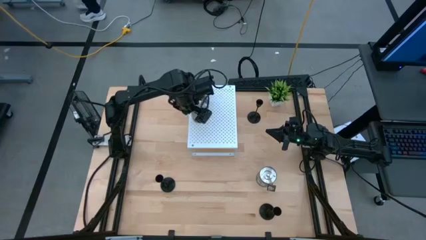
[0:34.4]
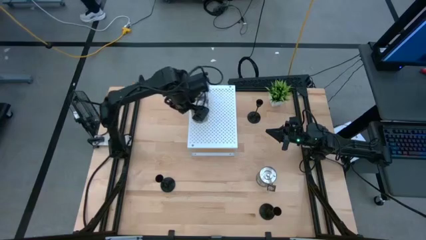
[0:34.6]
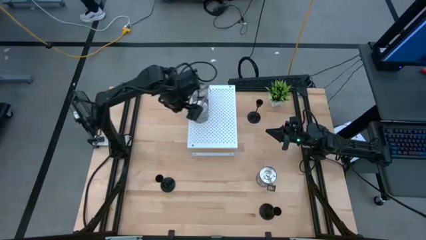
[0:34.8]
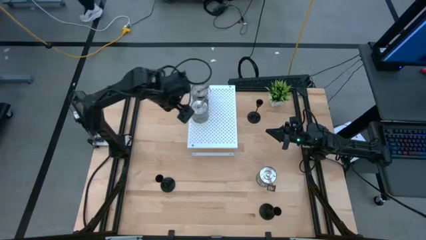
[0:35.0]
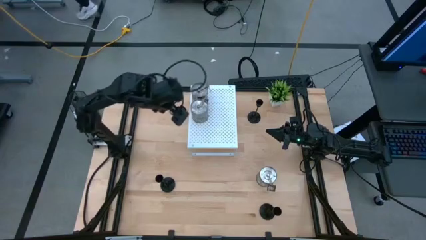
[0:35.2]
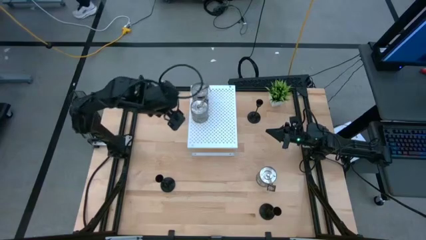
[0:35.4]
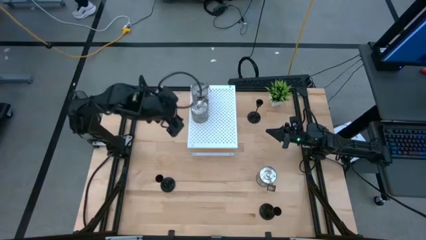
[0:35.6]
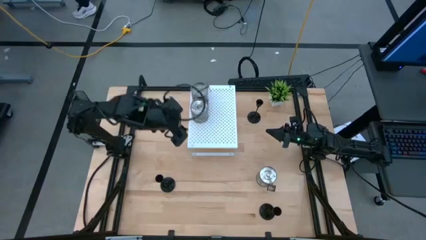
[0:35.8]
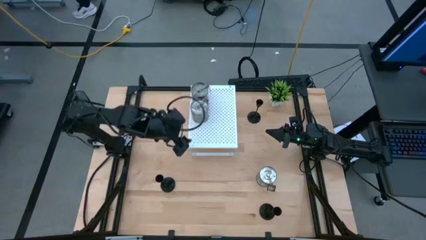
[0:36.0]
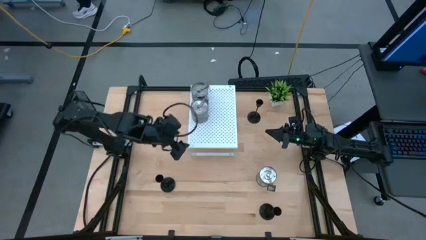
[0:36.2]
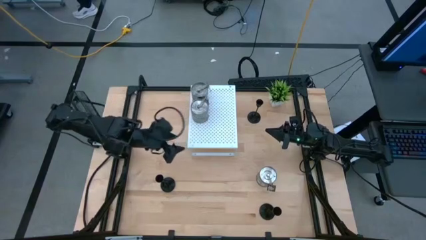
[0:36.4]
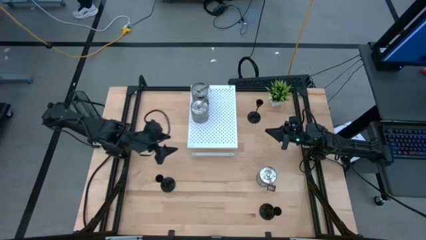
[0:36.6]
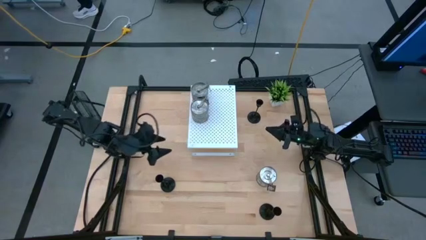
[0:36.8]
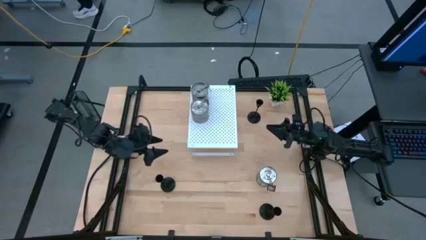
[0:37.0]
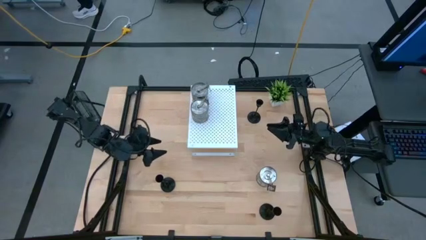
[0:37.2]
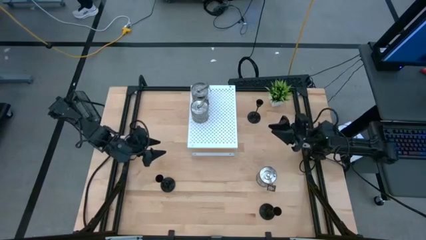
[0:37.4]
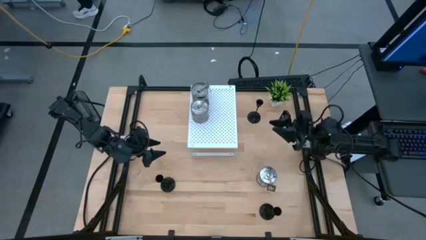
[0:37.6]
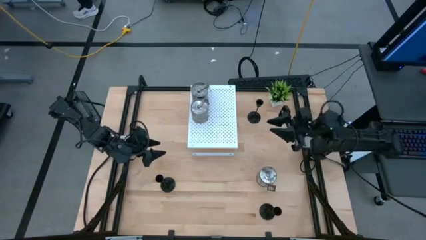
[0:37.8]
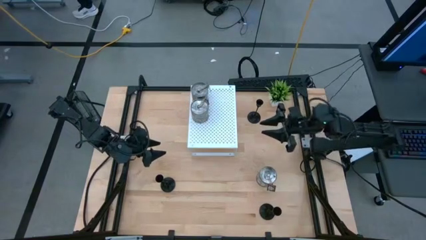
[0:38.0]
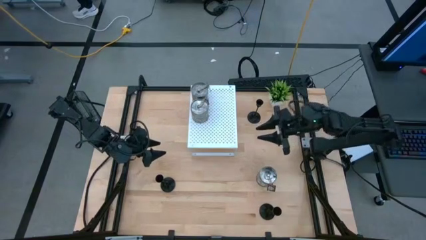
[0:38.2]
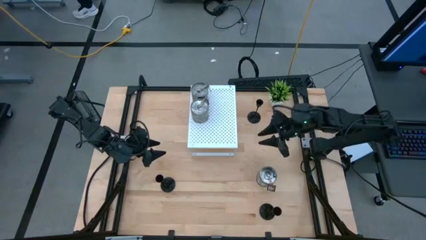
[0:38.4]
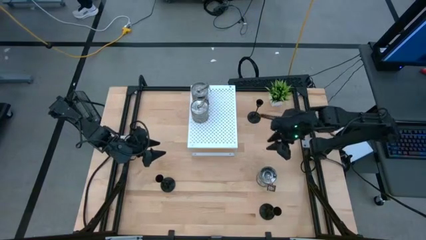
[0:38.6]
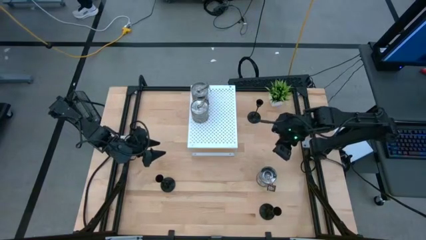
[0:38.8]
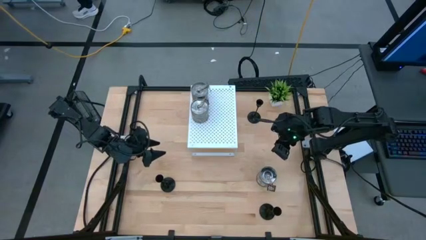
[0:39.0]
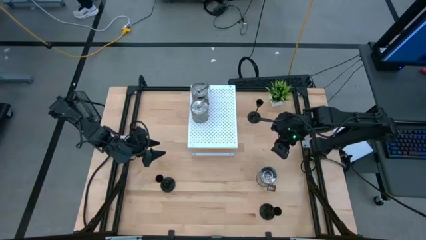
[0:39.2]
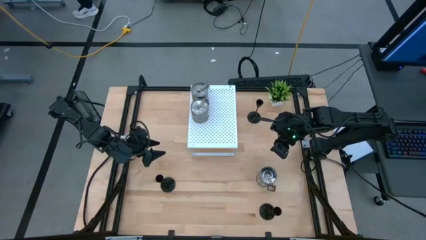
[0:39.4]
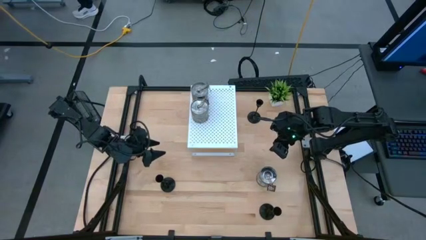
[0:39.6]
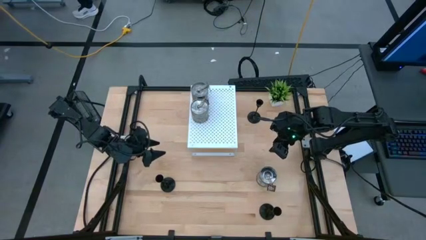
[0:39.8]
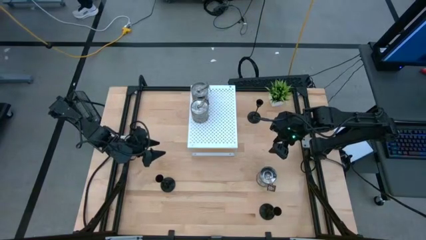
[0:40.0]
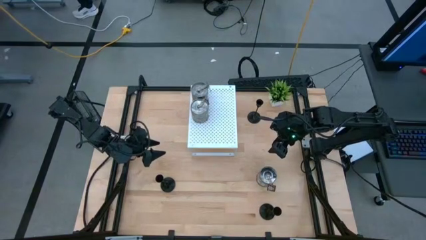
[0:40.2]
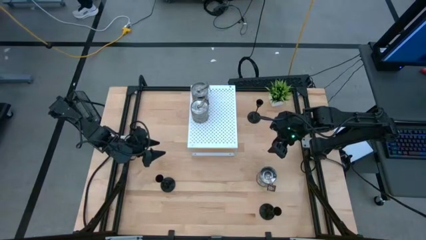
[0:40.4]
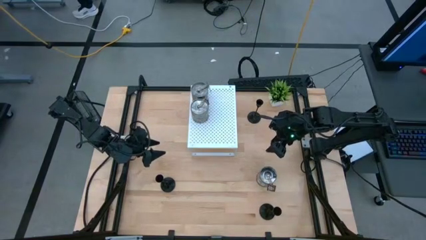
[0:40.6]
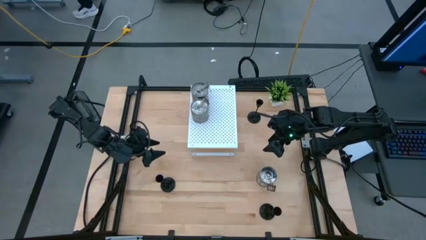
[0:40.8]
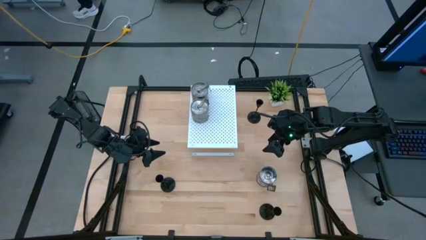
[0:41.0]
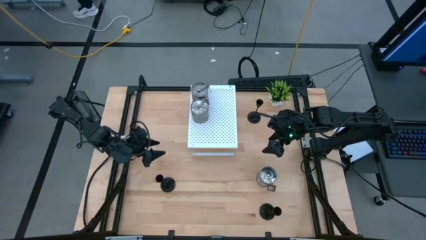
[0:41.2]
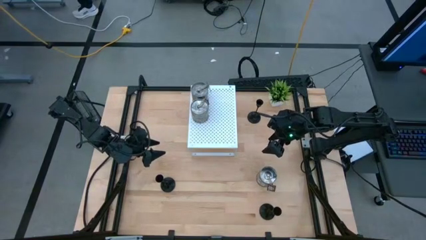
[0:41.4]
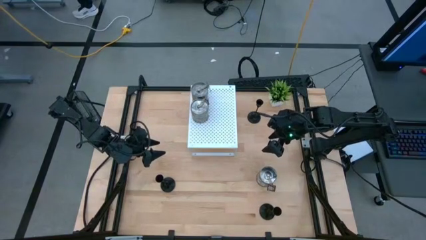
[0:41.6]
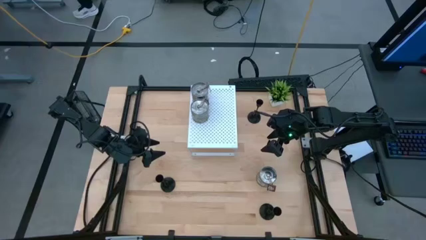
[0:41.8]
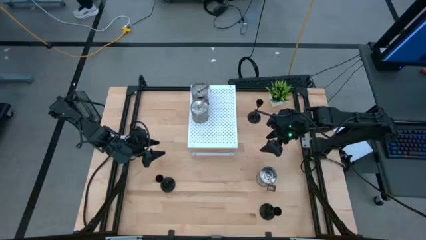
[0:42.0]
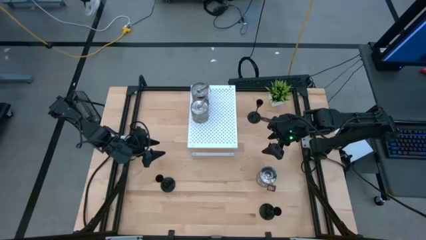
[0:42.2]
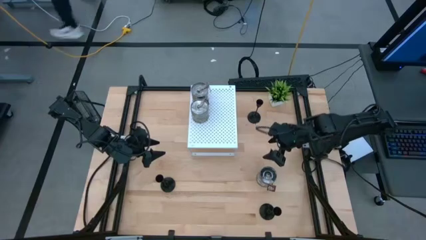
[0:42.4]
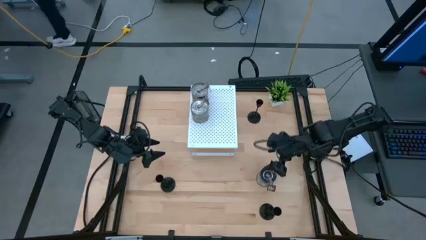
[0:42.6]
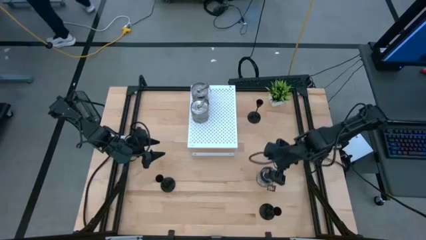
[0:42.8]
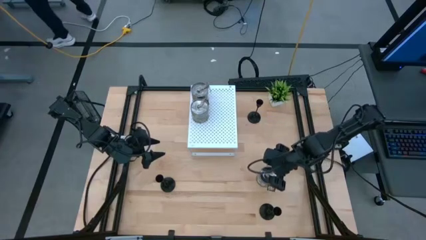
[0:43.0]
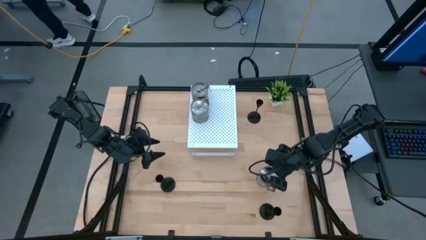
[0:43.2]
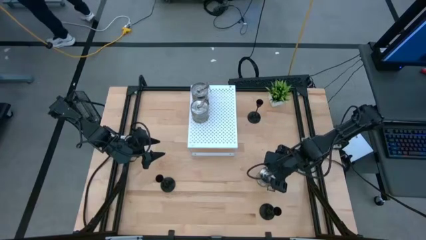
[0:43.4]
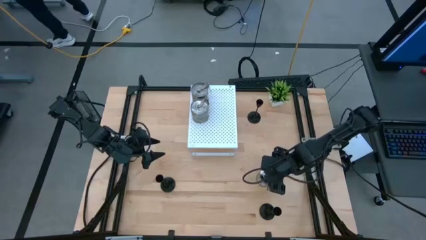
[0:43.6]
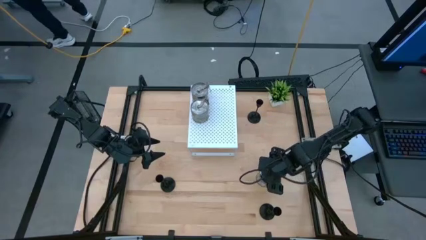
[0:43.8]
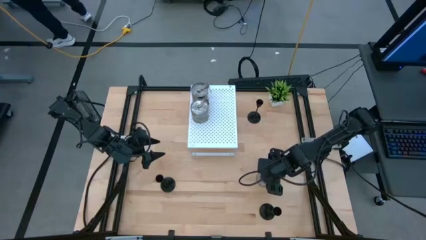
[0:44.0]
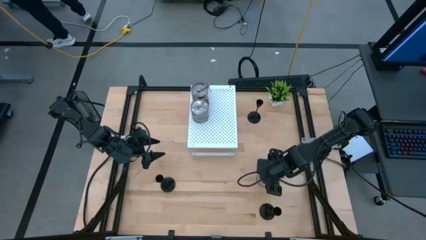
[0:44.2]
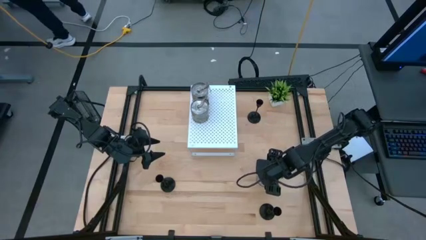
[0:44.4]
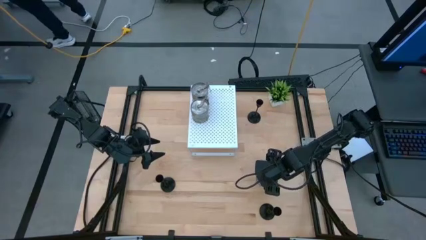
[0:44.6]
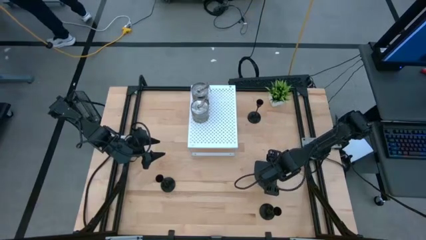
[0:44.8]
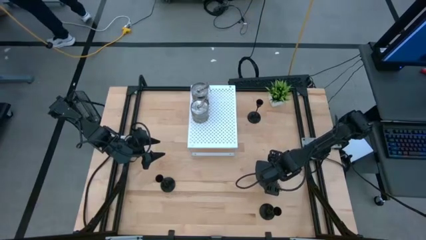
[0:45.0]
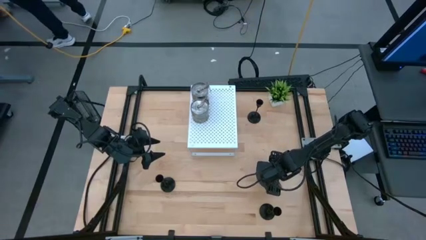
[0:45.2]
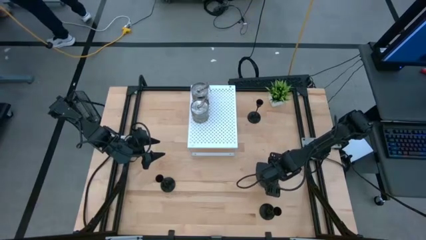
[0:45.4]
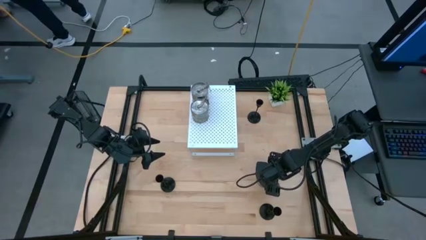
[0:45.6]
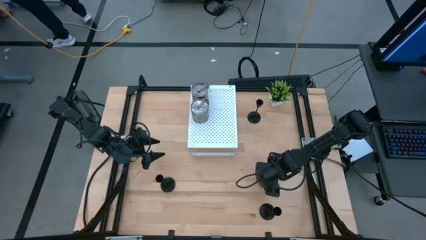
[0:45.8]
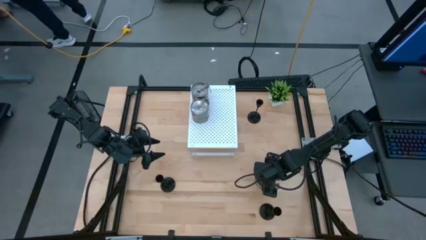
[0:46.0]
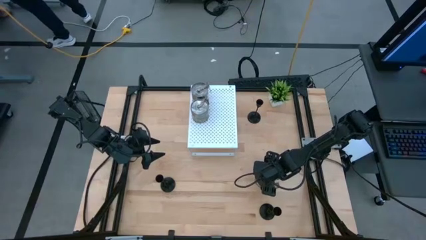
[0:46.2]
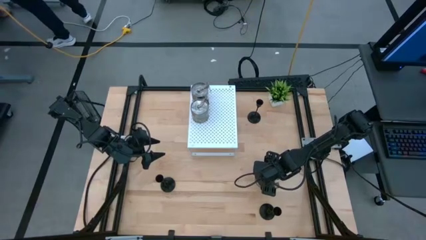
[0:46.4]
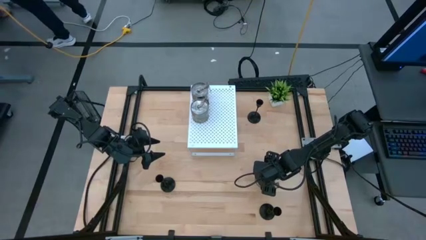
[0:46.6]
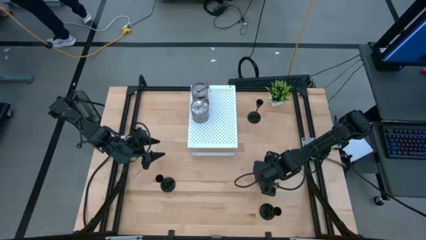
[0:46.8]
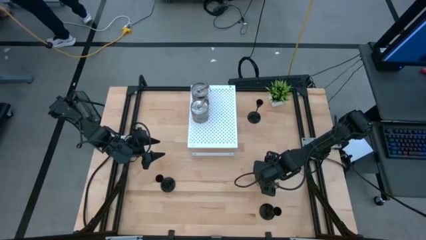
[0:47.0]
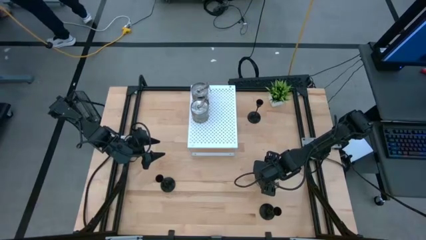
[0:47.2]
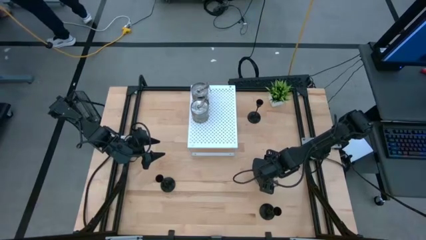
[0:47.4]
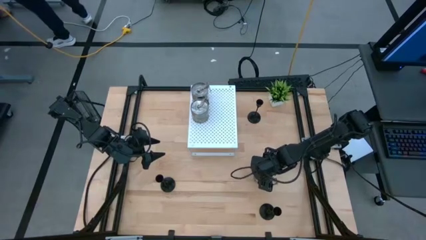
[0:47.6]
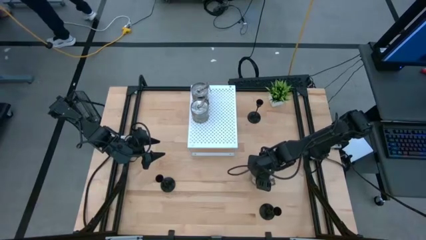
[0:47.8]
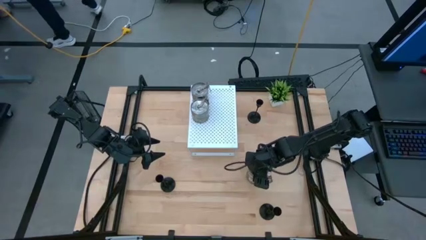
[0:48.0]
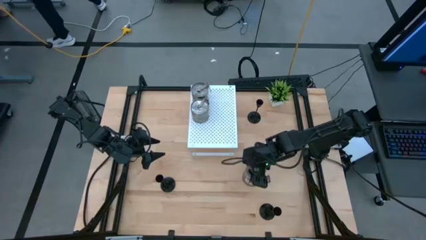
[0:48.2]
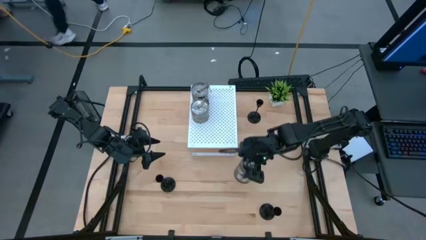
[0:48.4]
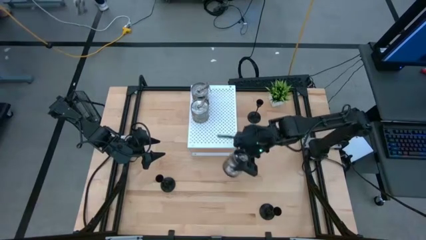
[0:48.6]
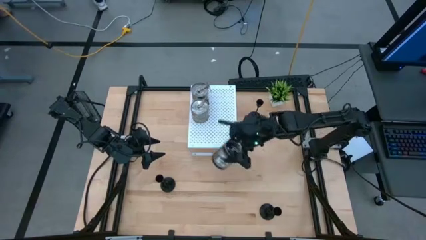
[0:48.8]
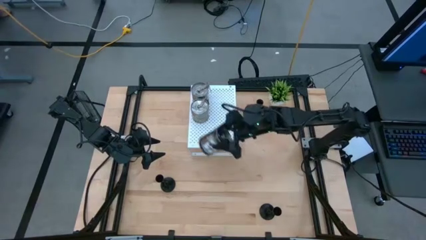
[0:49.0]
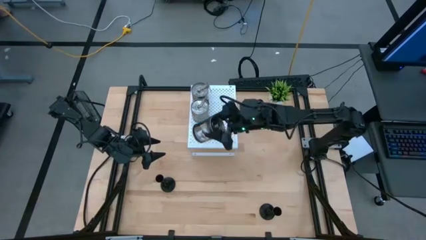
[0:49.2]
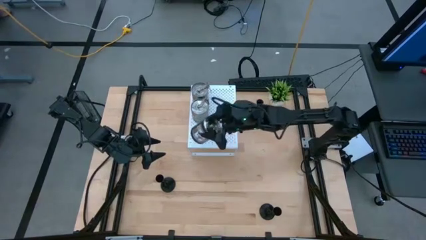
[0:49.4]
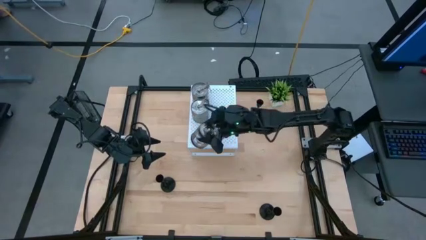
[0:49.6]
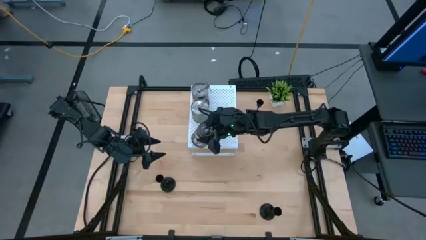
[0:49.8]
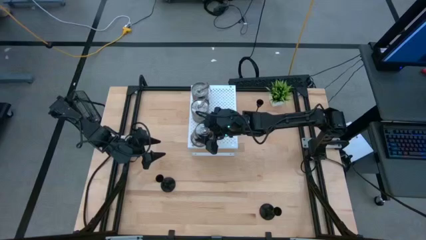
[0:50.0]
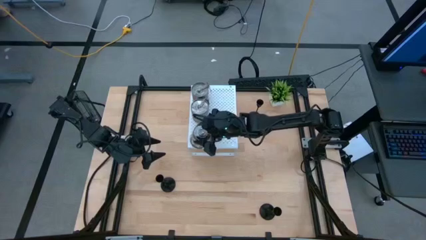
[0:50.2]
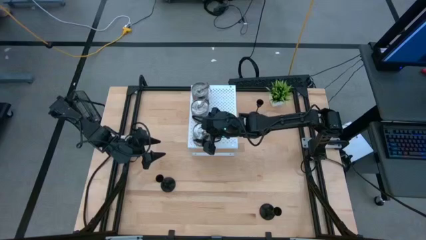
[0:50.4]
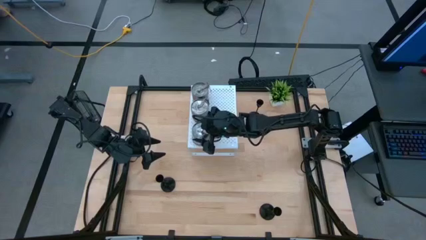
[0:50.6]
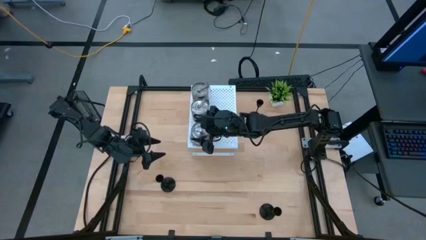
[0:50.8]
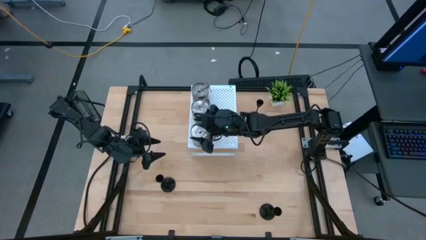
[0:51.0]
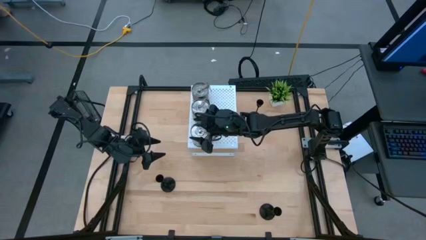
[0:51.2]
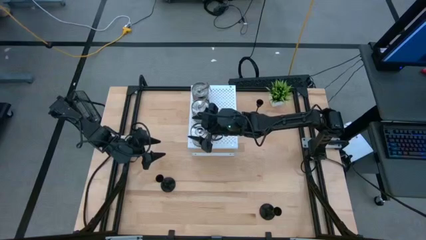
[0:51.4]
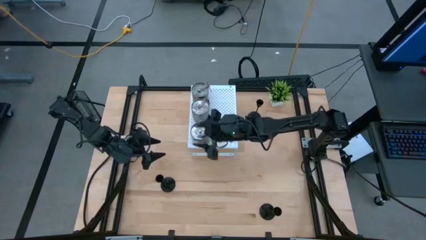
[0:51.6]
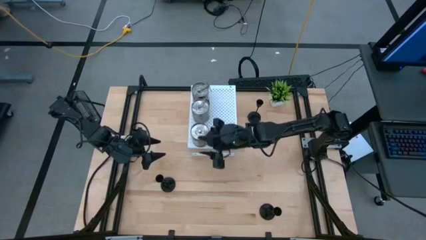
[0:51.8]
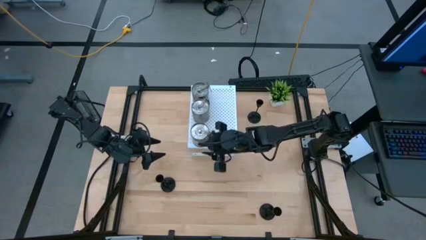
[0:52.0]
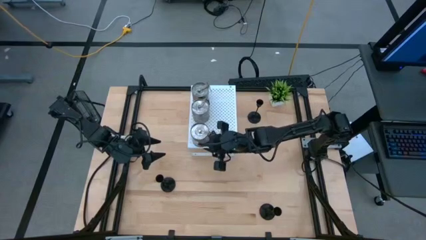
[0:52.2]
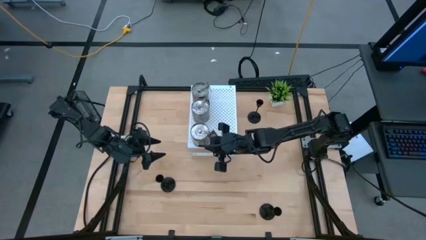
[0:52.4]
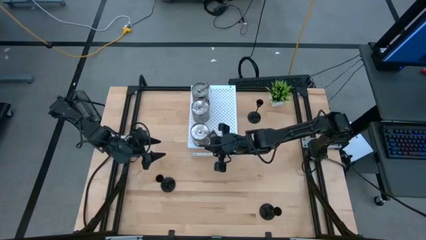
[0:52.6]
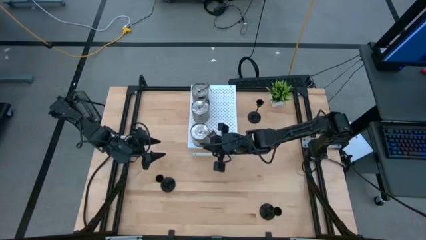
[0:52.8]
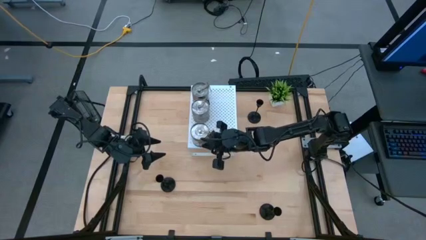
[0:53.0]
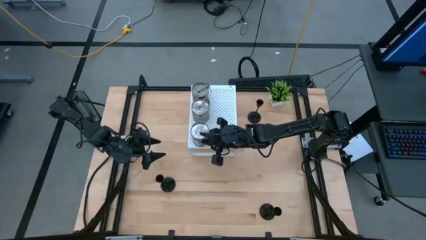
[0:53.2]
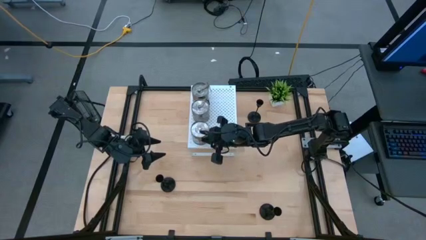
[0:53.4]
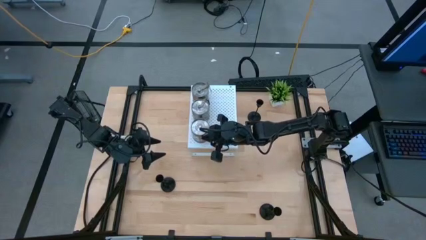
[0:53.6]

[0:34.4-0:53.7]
Task: Pick & Place candle stick holders
Put the silver scented candle on the shelf aligned with the other silver scented candles
